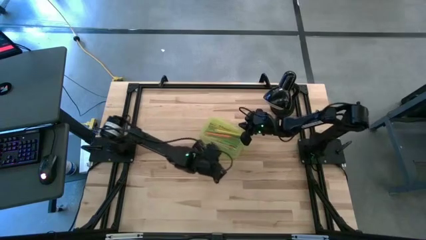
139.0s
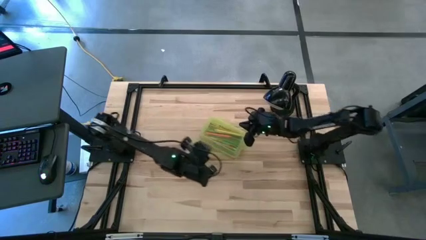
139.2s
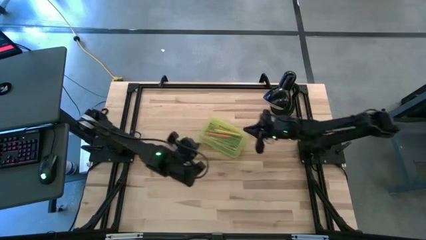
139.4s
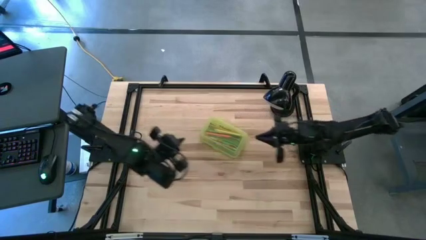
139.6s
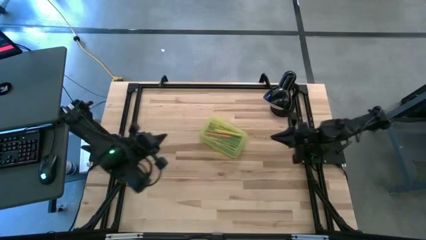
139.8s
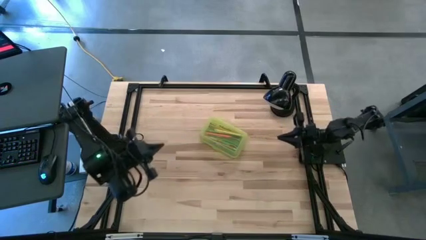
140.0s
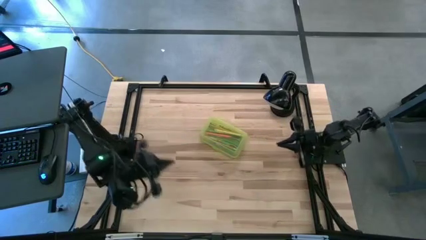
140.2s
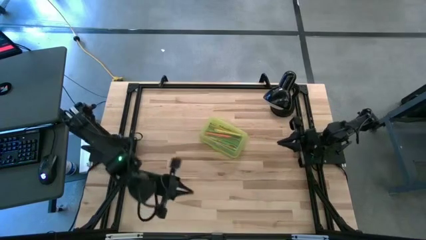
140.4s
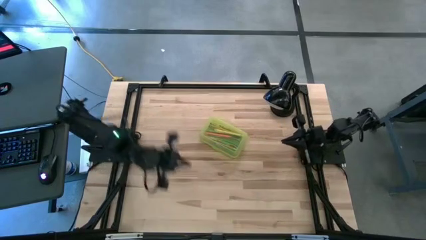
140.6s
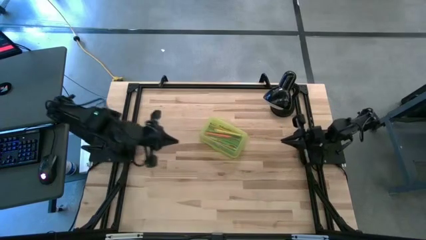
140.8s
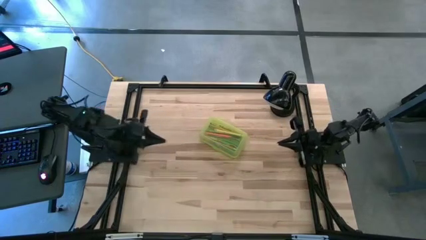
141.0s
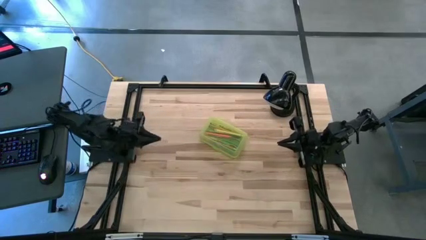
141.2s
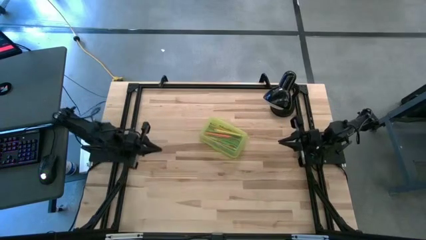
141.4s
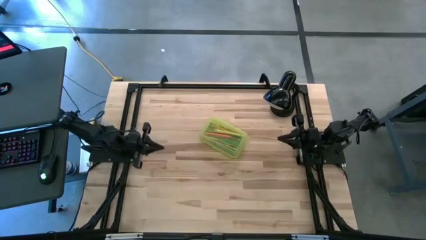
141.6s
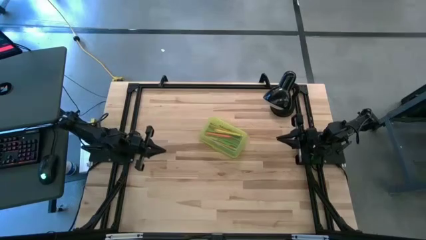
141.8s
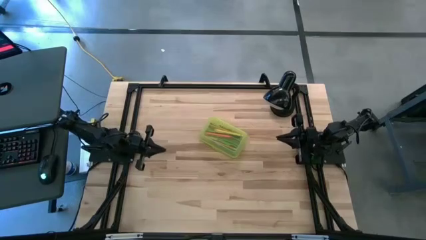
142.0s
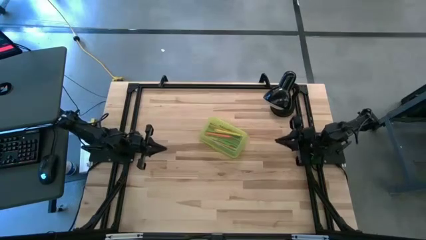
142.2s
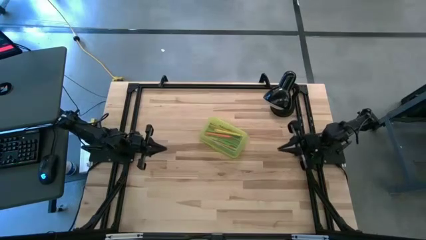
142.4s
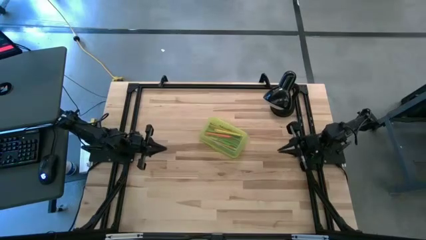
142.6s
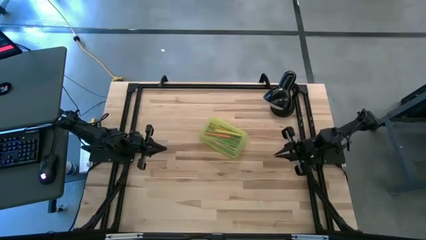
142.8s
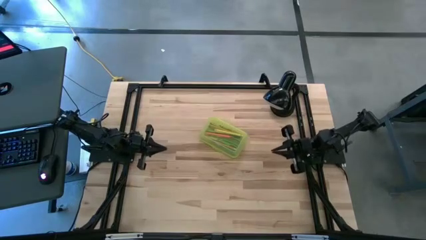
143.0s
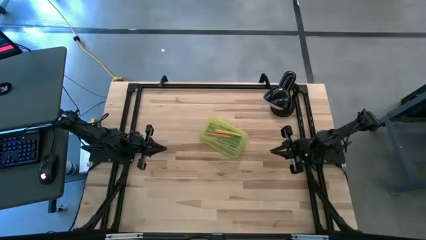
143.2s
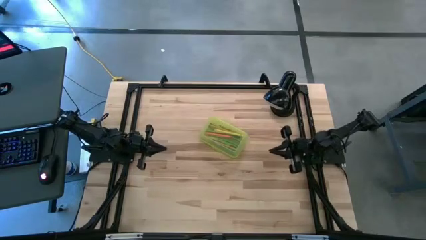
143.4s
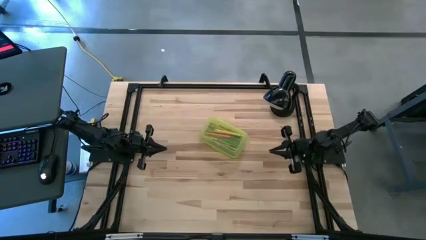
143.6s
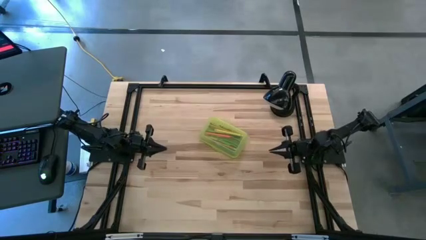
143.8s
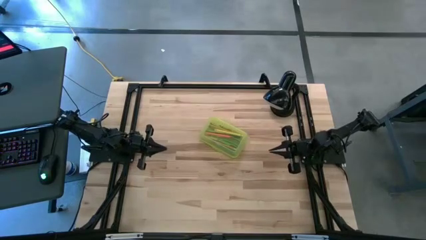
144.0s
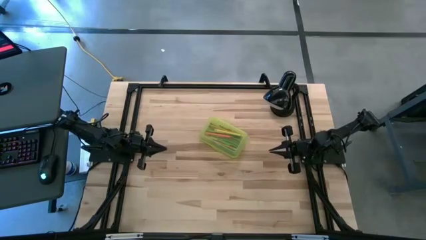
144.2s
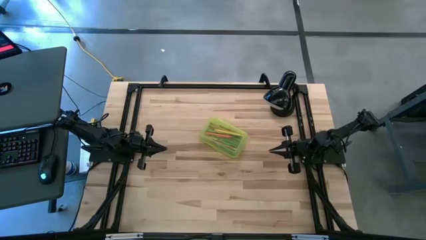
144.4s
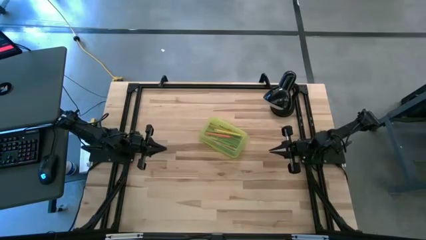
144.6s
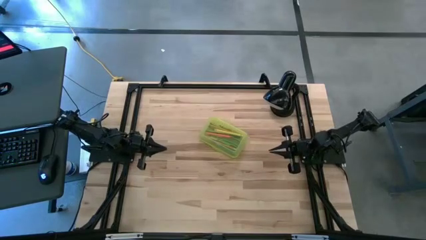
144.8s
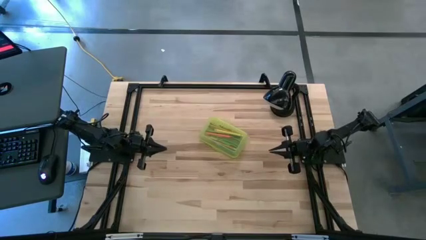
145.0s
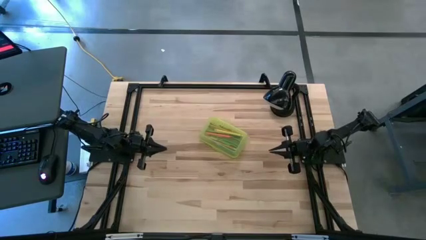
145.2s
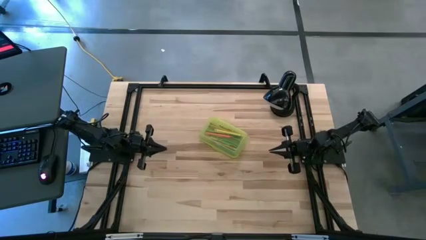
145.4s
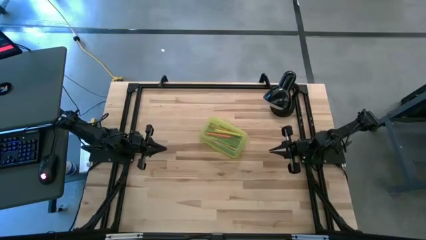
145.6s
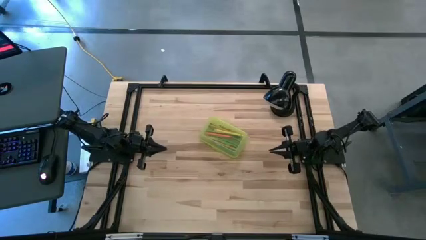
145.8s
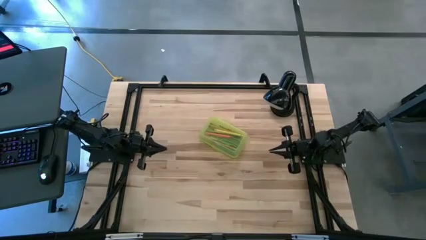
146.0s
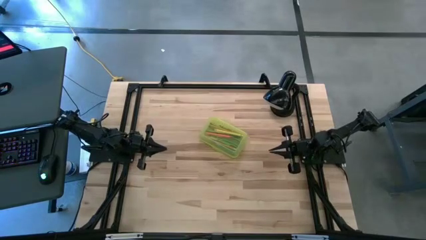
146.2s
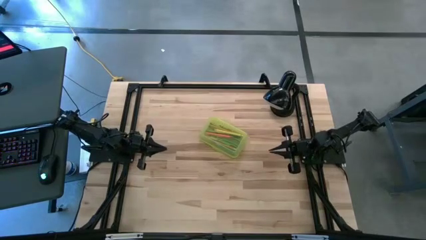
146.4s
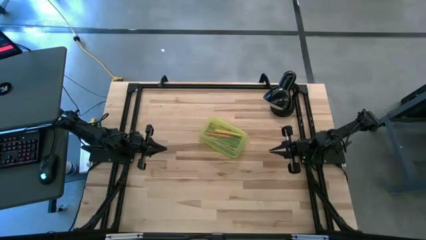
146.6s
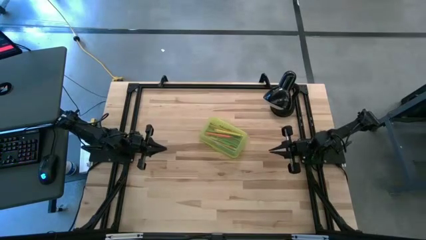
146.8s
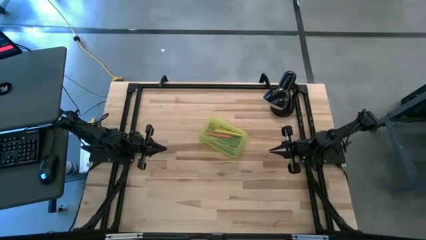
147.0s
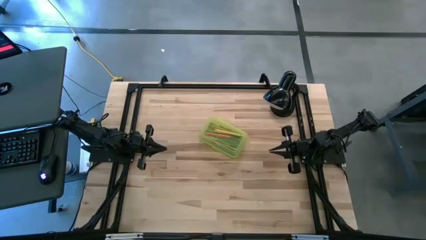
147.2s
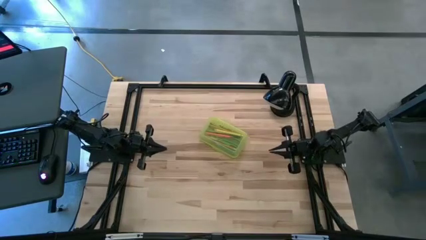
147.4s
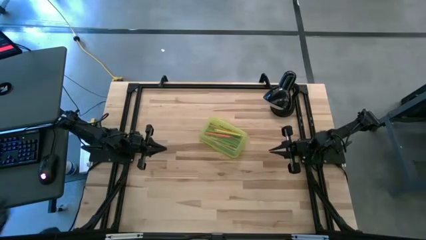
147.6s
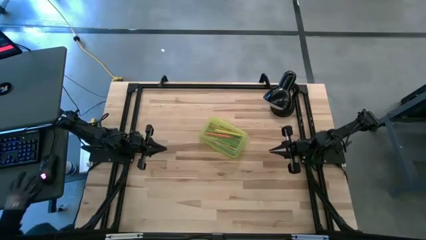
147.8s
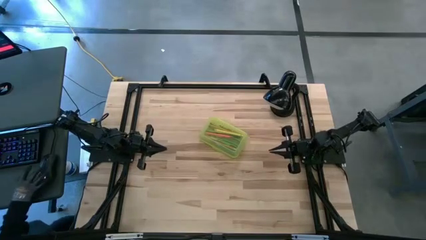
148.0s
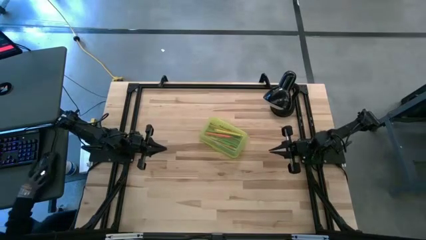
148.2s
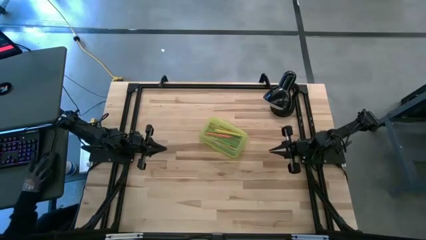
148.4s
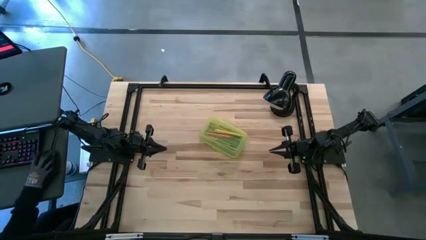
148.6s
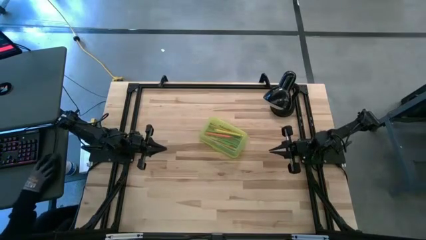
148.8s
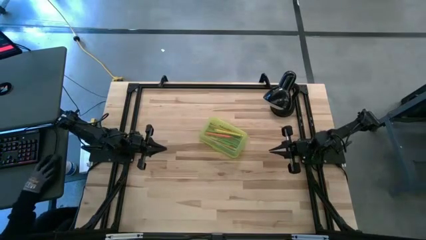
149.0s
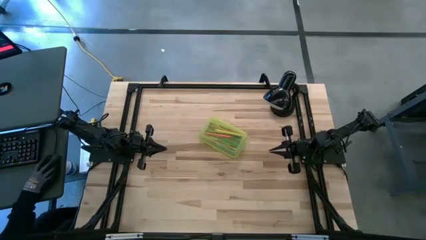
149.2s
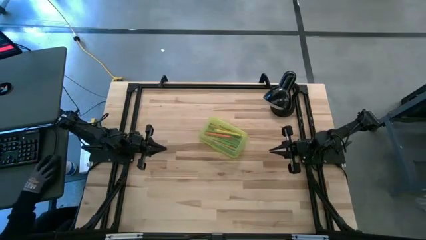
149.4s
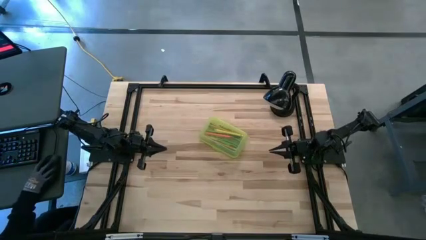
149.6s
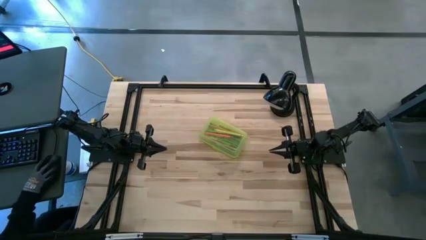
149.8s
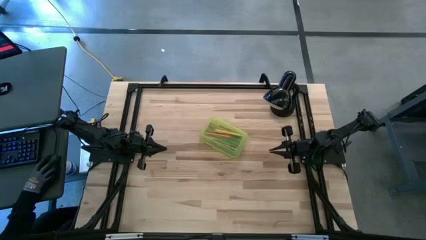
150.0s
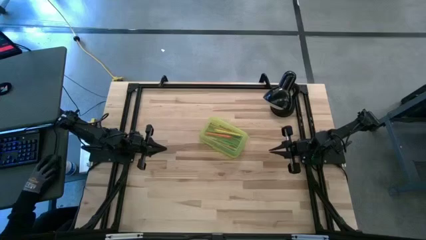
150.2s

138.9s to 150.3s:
Task: Pick & place school supplies into a supply box
Return to Home Position

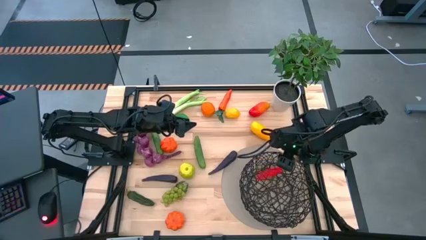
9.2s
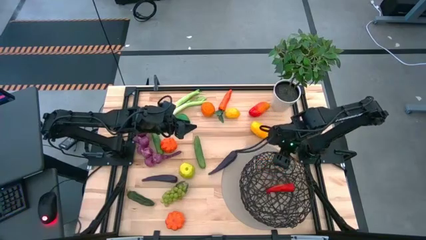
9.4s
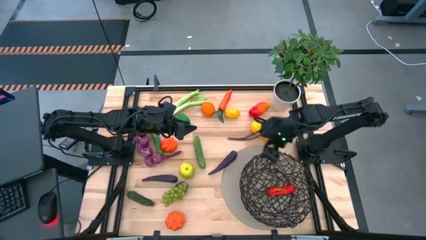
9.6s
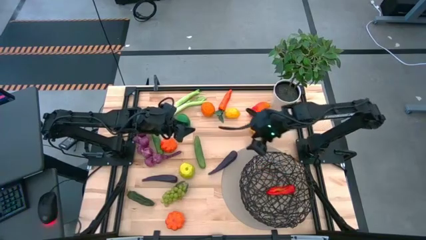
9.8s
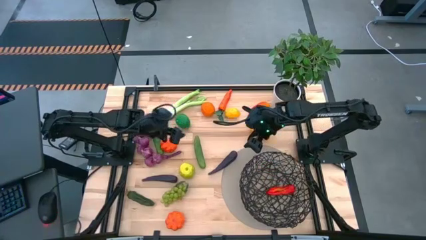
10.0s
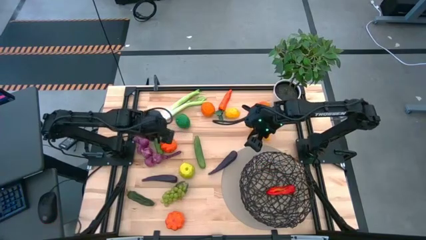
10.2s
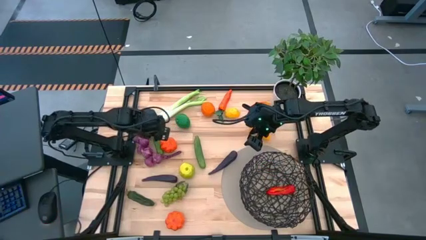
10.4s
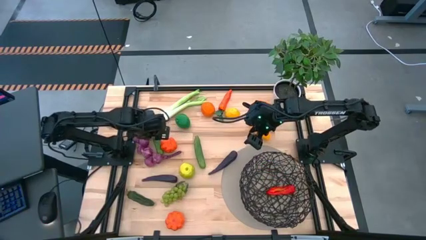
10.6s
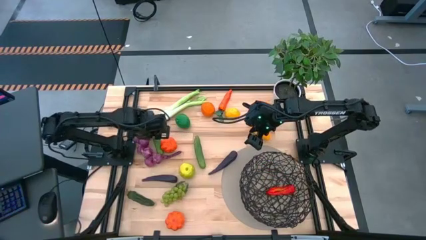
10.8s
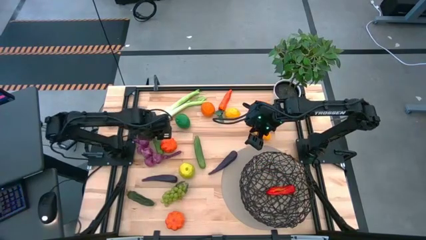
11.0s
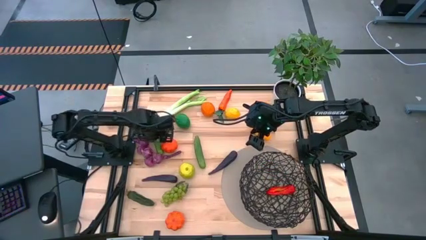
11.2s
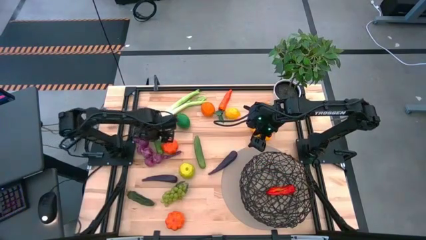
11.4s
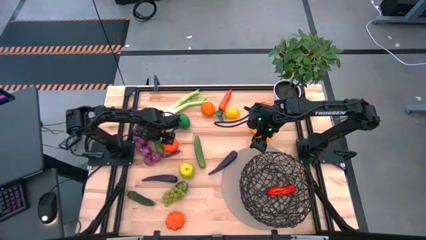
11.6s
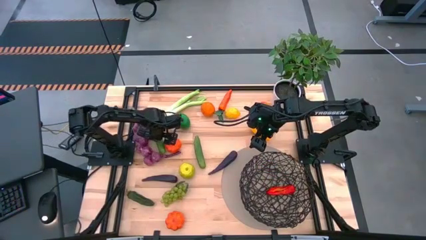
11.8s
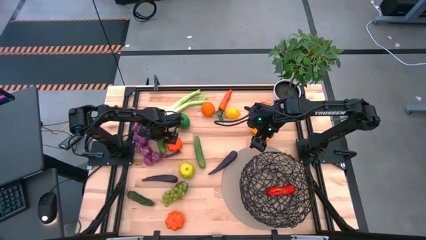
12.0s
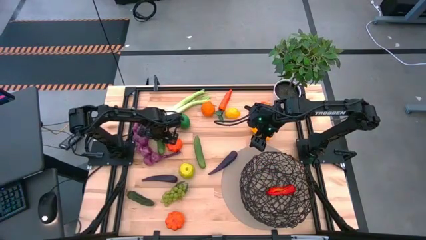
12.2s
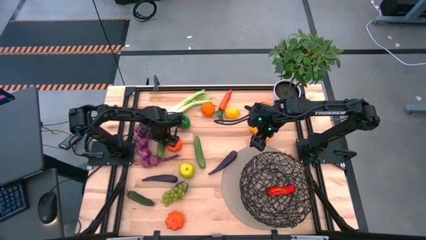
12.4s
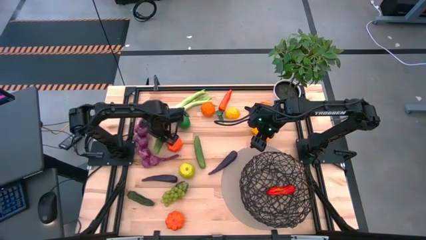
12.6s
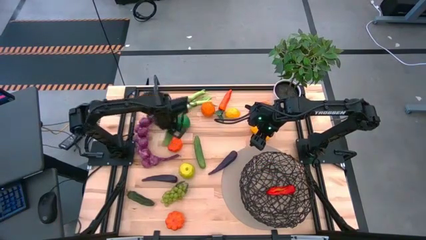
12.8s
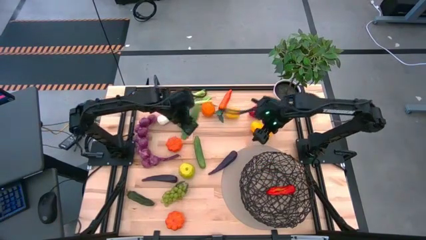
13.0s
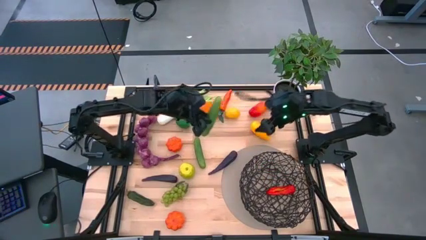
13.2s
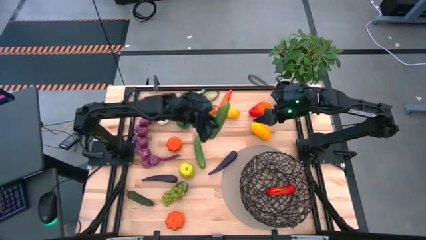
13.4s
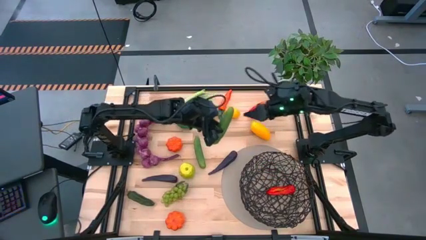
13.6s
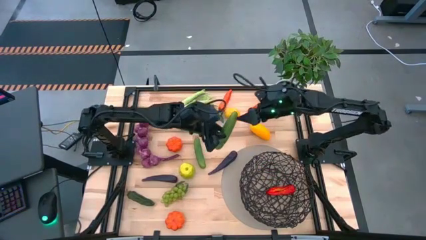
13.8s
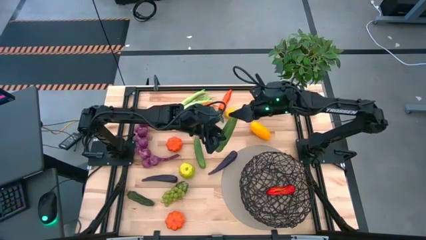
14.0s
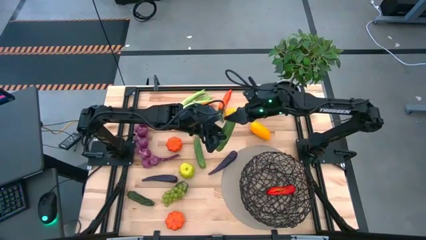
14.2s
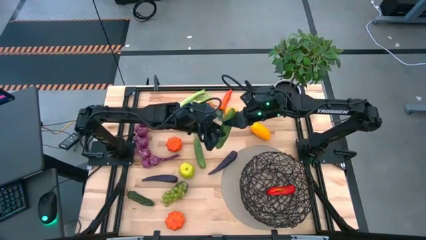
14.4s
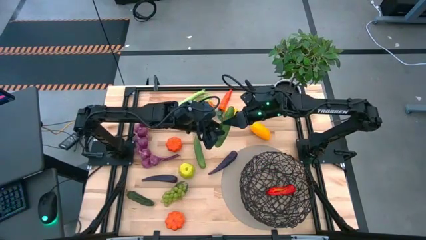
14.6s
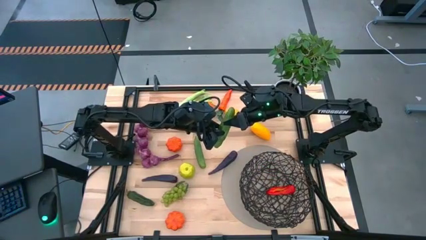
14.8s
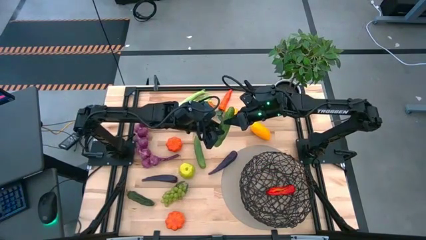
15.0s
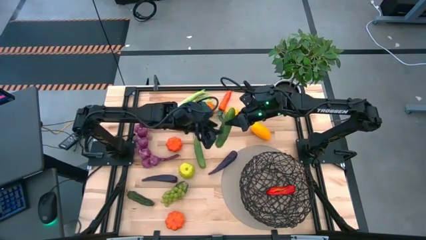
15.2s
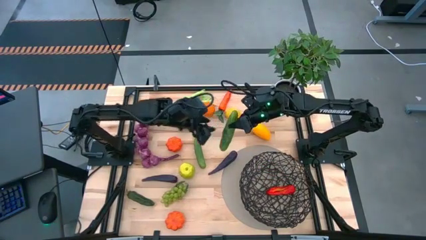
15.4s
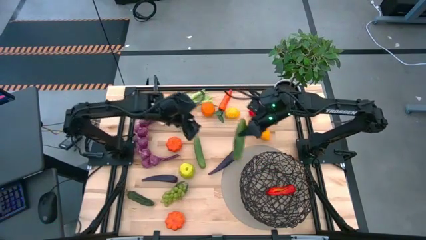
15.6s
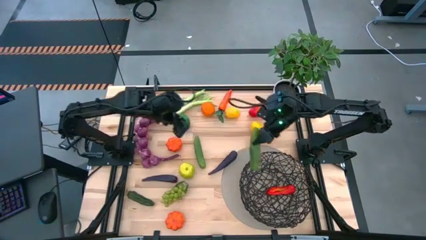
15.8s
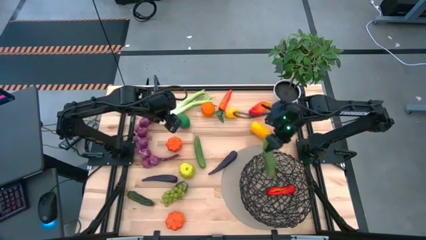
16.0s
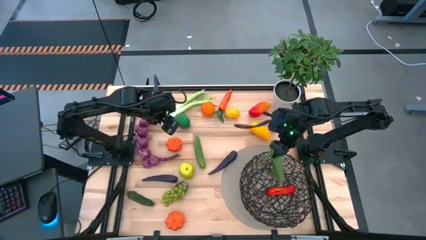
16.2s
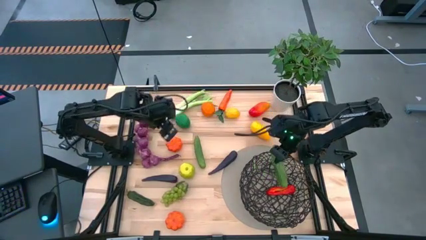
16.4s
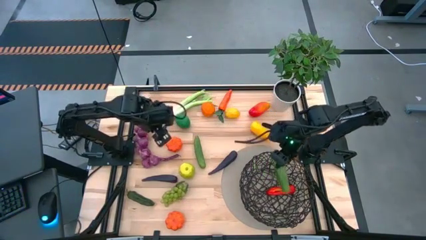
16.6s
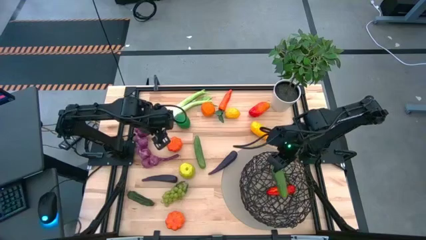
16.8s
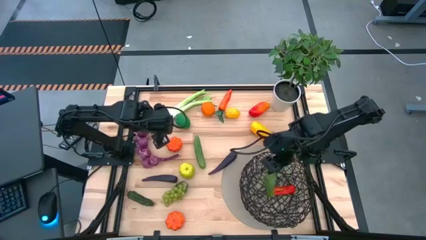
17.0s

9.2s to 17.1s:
Task: Build produce basket
Put the left green cucumber into the black basket
